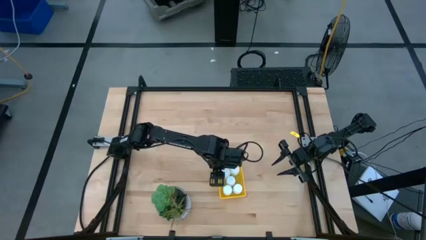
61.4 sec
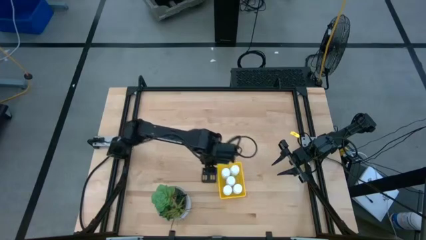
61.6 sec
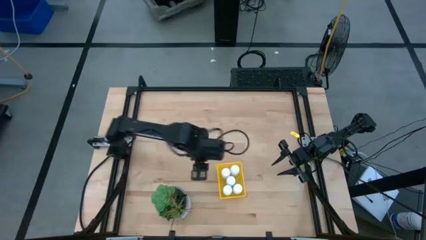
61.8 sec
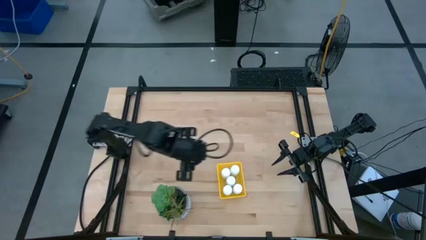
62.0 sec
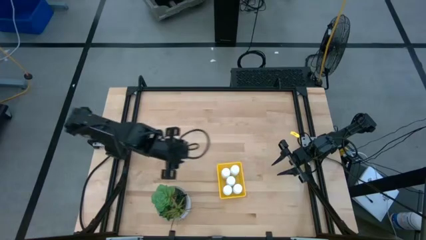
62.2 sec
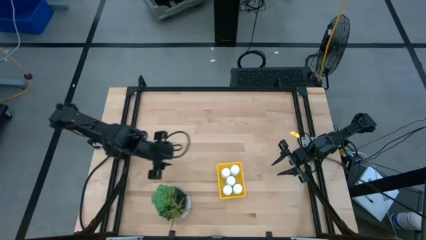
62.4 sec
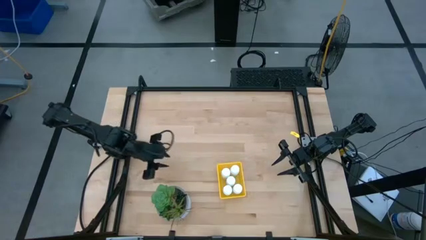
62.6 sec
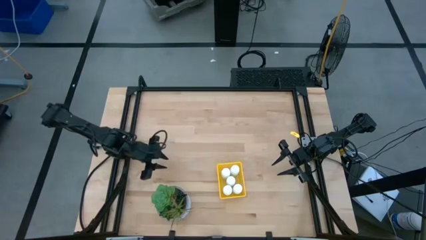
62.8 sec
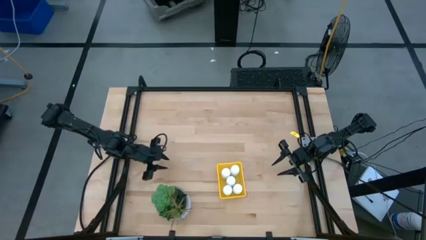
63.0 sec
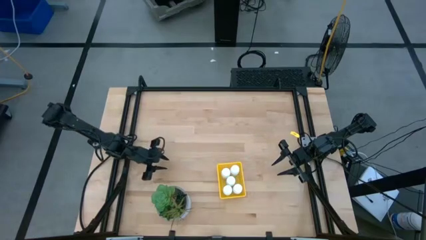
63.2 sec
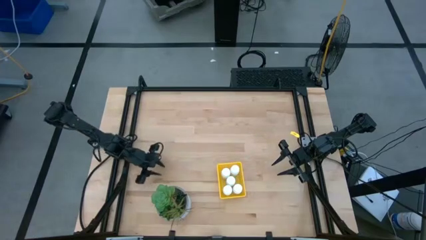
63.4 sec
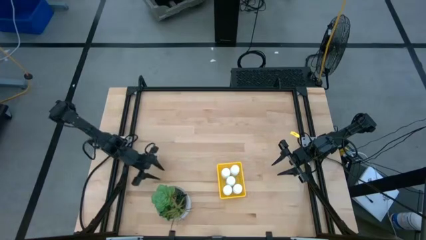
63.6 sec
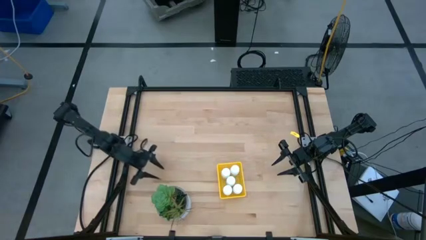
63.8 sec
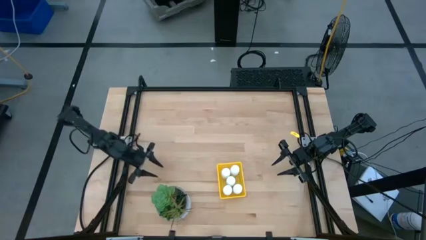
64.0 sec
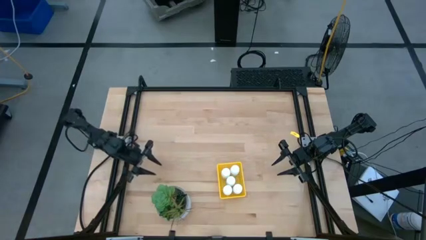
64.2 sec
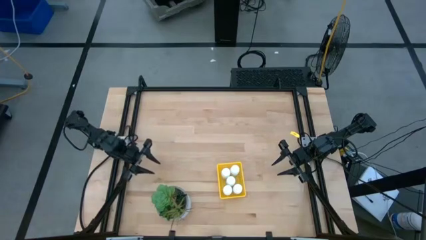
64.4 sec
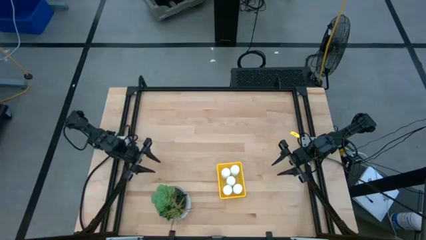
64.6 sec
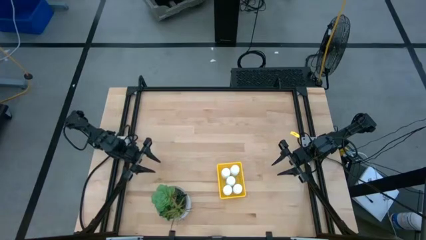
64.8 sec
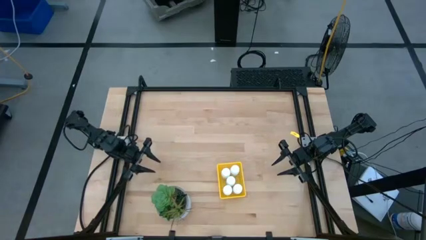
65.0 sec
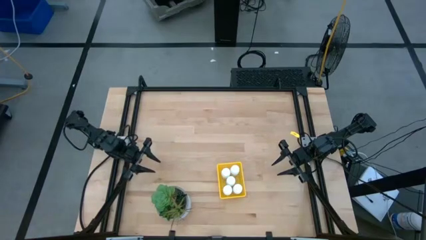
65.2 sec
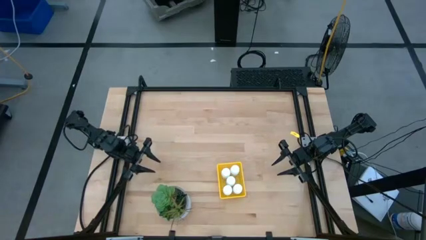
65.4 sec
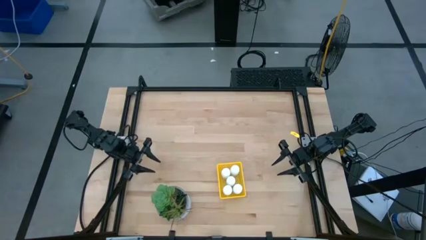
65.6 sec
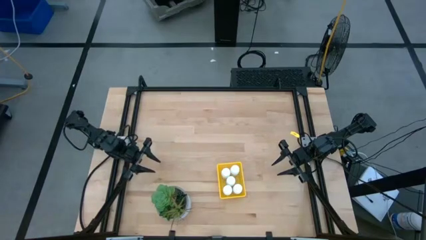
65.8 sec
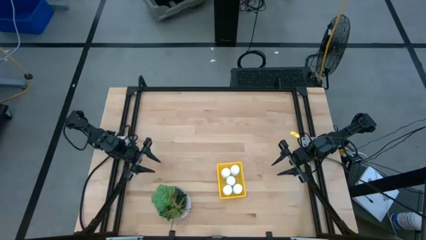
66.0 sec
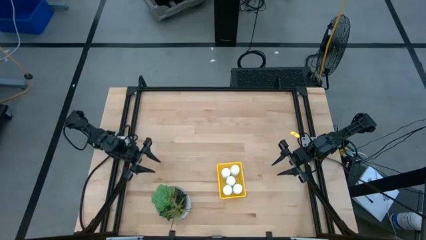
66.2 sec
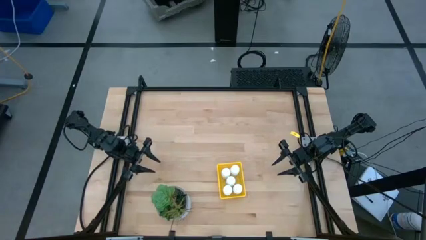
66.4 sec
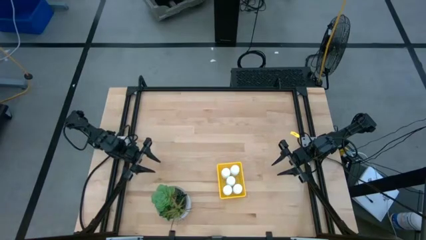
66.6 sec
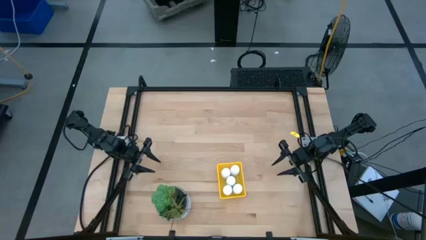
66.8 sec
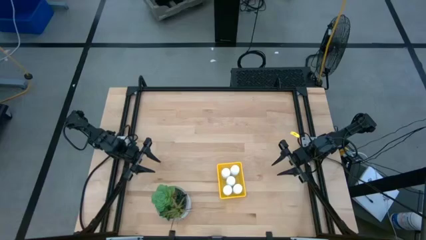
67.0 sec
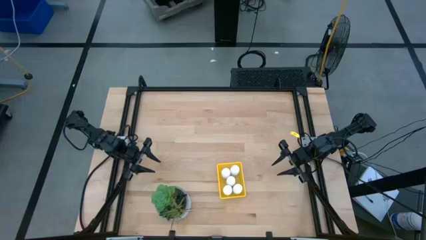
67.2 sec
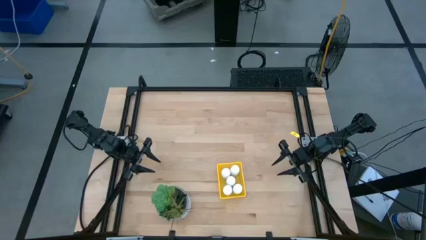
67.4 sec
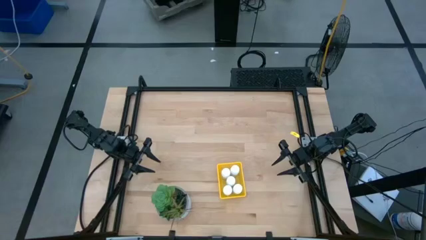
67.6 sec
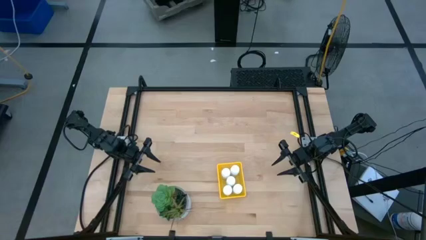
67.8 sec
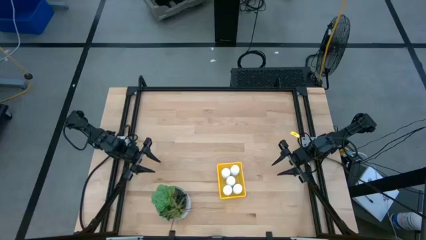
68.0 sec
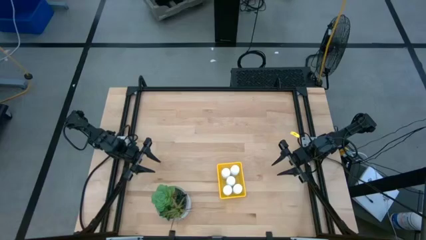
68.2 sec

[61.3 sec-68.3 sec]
Task: Pick and place pill bottles into a basket
Return to Home Position

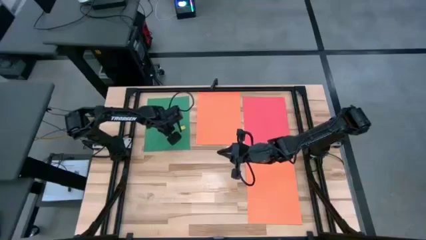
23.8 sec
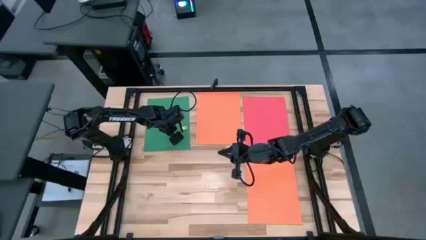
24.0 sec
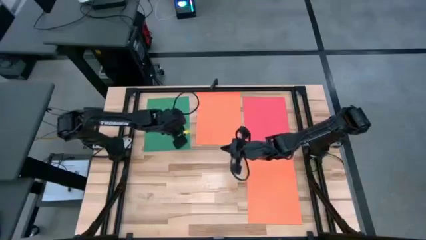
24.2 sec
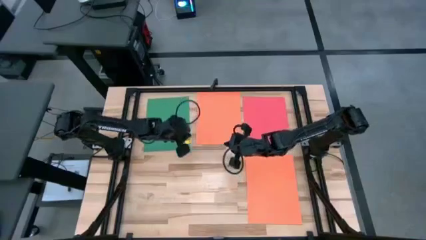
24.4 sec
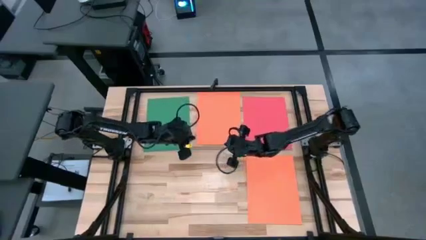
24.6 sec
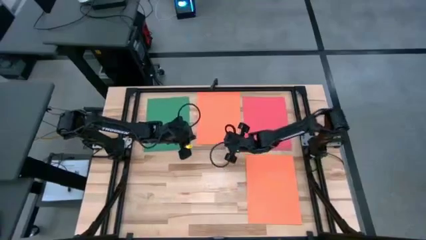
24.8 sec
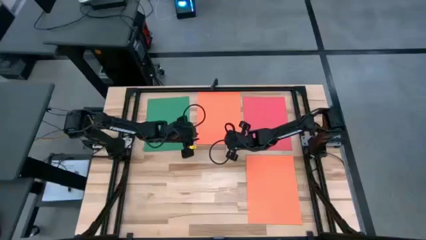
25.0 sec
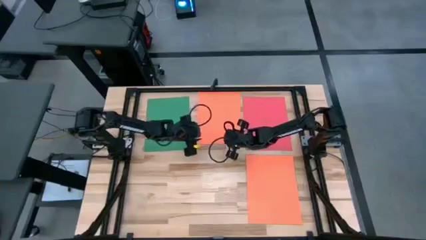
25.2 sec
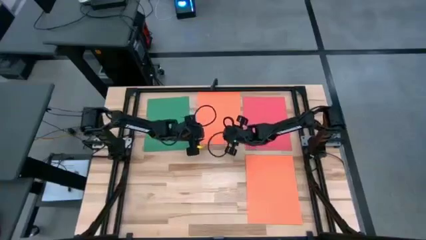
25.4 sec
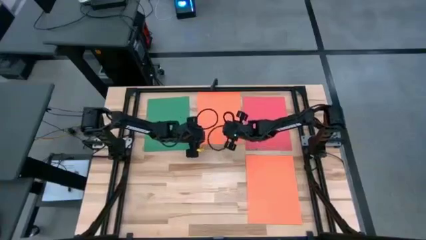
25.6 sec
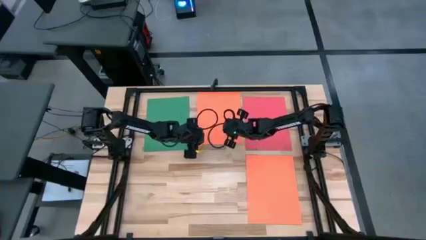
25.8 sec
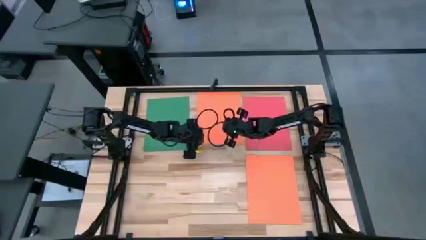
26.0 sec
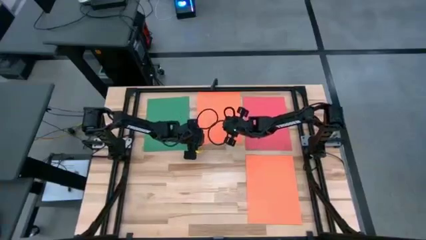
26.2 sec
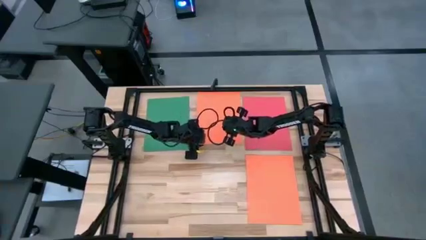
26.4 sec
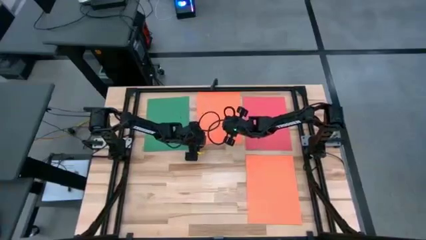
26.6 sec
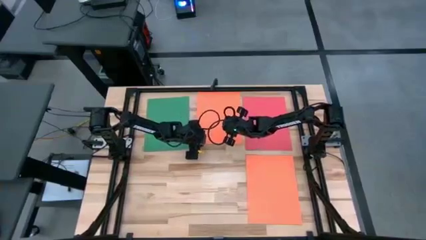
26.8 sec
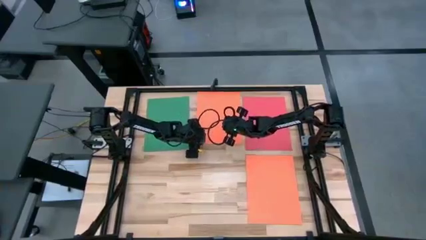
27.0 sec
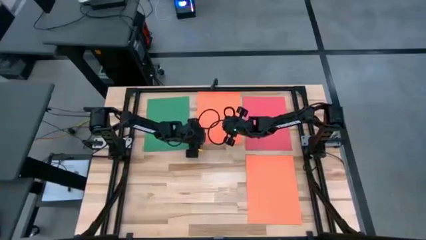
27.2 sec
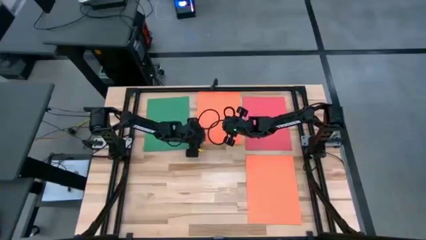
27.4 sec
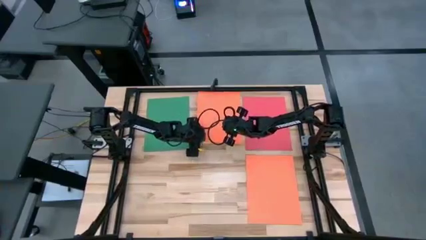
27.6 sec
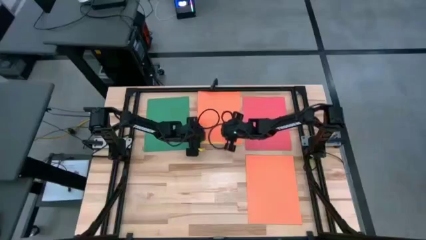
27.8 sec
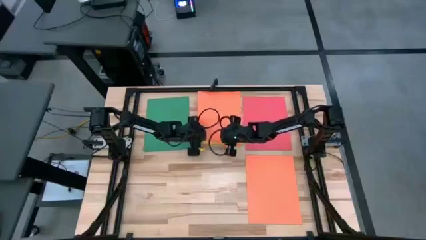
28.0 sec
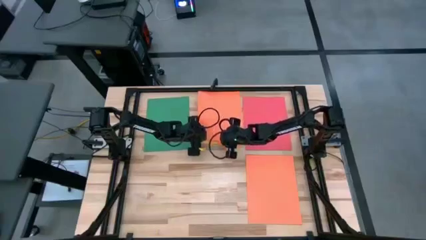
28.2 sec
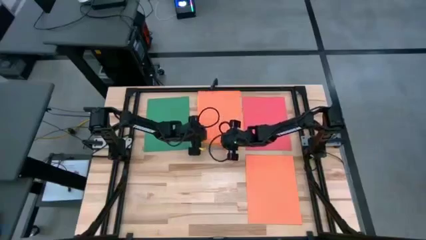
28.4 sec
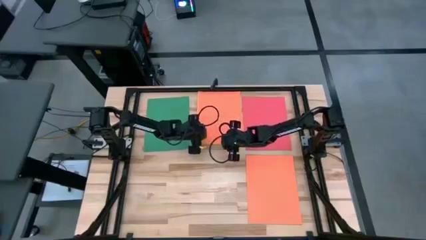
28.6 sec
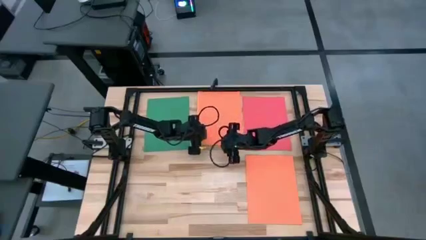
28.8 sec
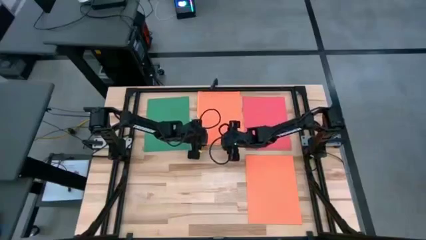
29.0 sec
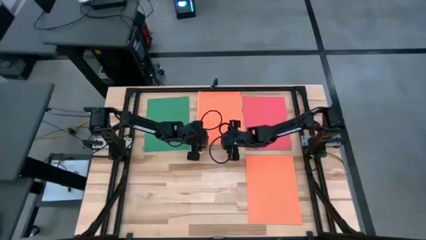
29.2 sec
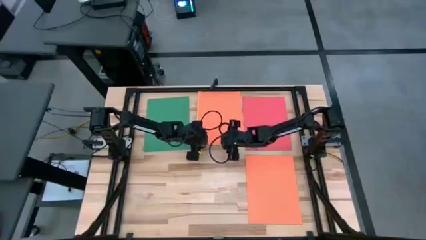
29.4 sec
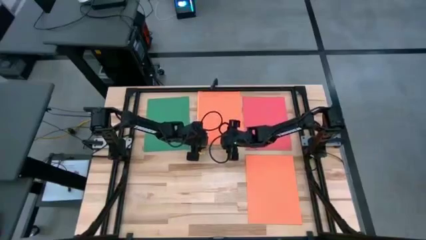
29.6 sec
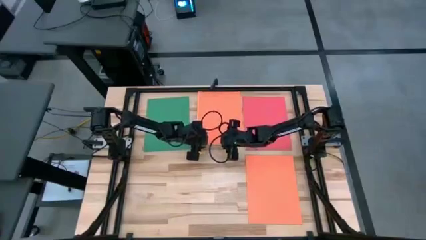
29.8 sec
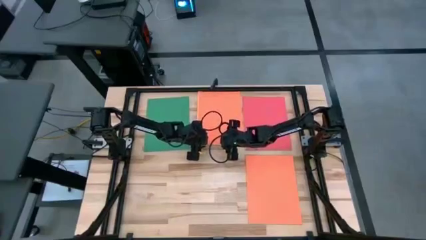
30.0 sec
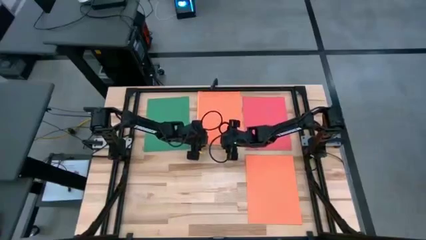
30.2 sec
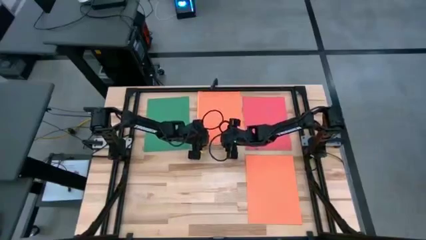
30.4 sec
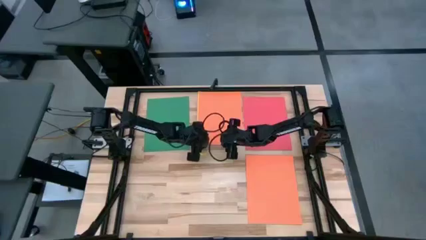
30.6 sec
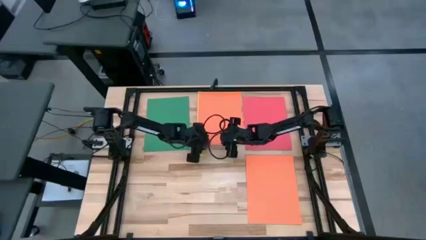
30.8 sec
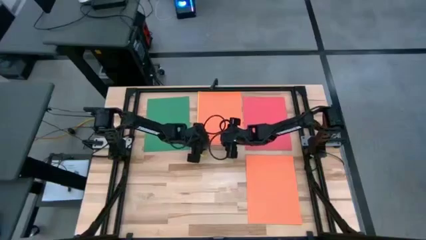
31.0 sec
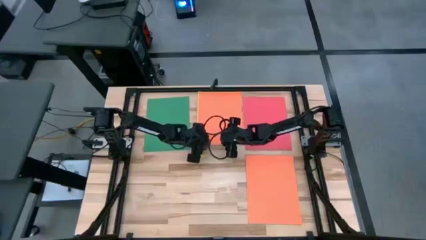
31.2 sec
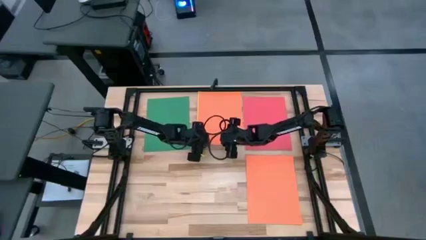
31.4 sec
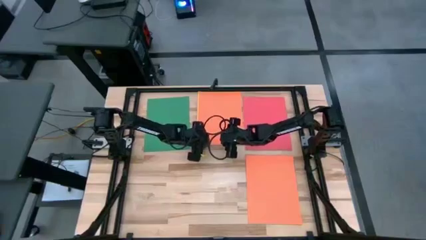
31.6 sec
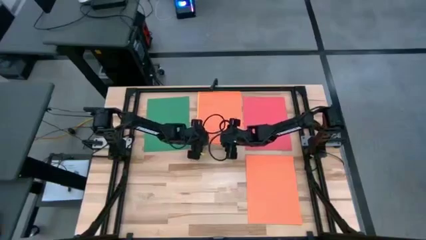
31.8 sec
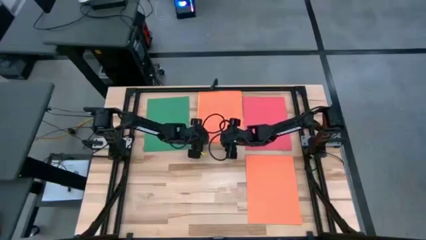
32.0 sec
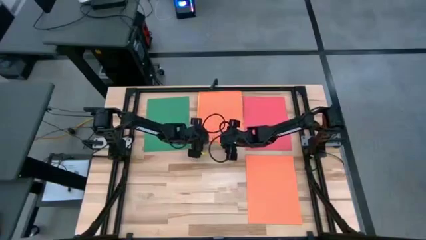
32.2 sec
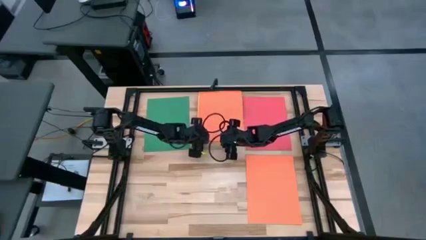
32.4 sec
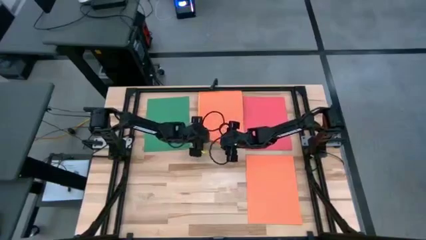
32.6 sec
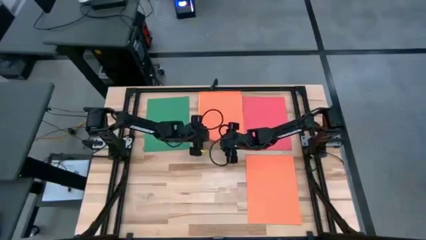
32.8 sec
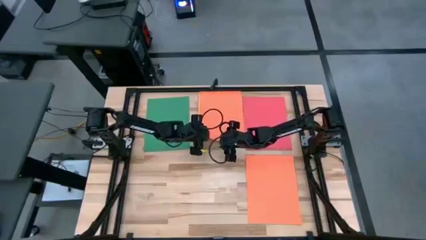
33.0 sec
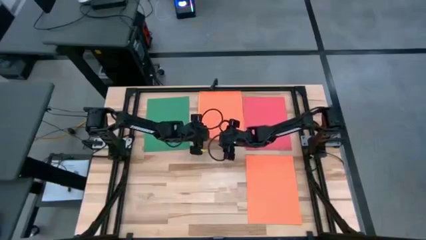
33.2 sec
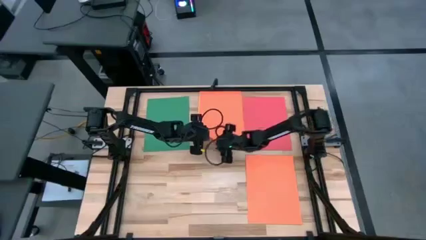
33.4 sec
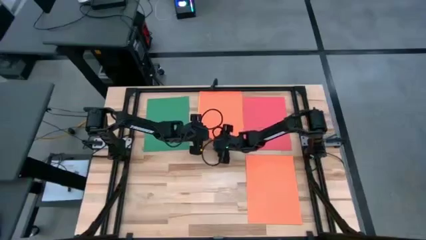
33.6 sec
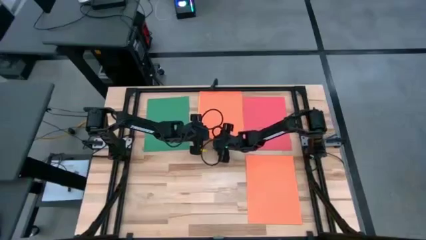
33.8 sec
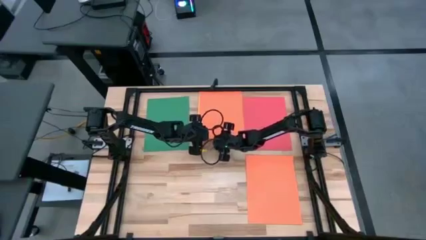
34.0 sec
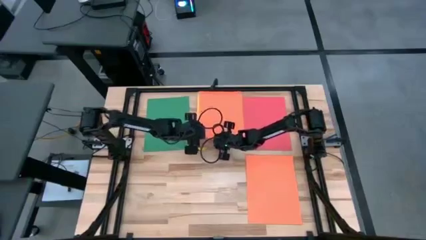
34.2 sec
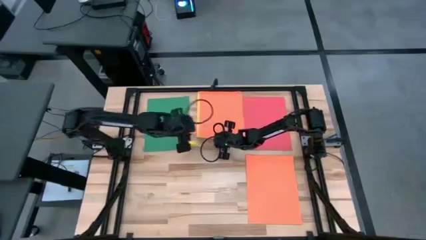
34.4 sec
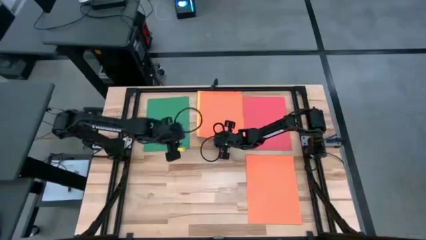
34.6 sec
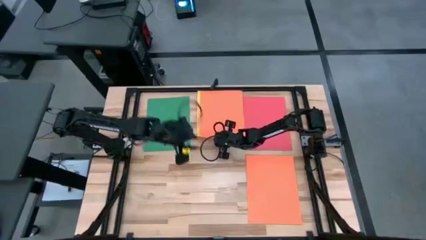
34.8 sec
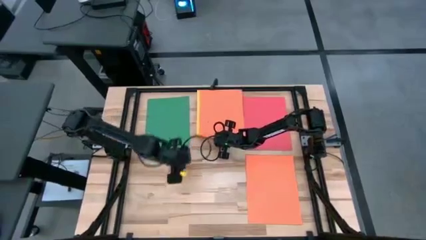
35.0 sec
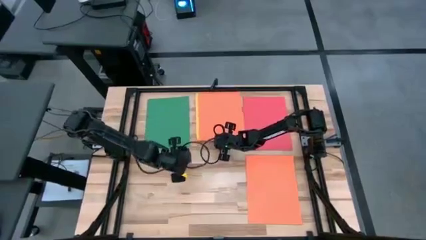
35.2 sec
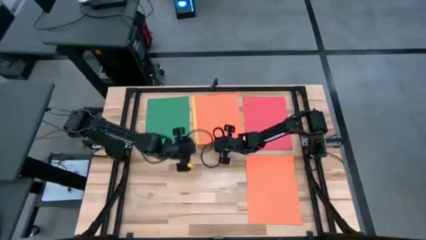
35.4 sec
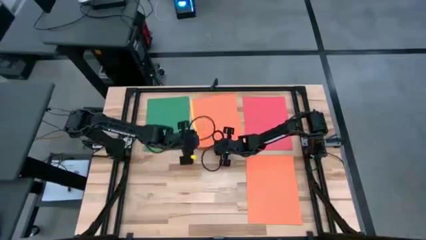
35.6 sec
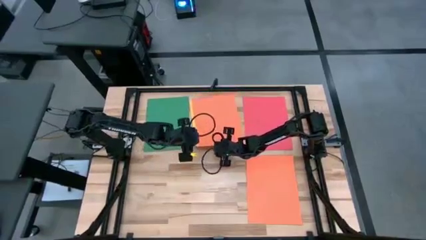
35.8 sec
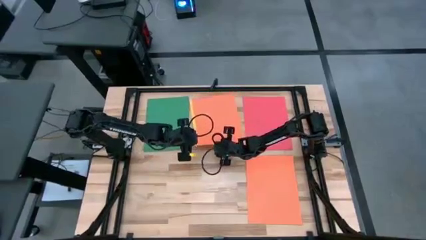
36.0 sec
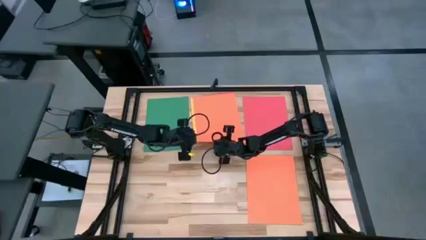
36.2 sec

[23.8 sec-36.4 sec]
Task: Organize paper
Put the orange paper on the bottom left of the table
